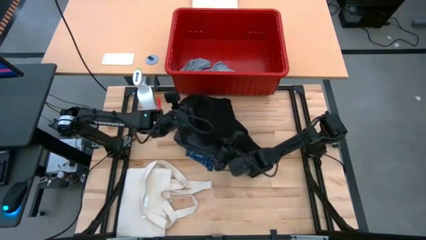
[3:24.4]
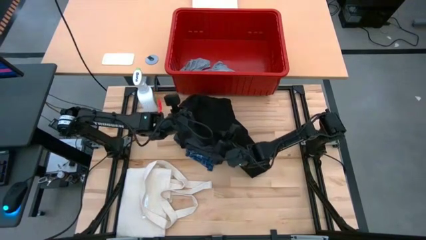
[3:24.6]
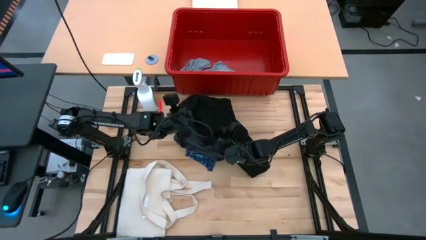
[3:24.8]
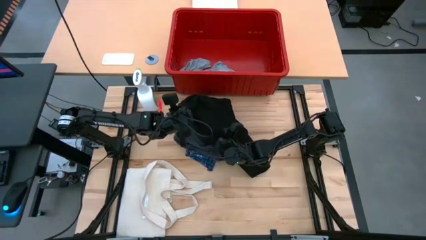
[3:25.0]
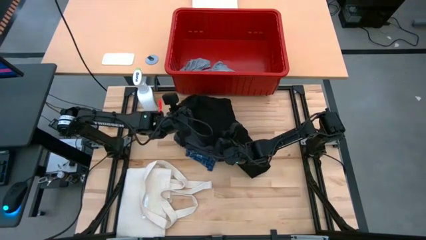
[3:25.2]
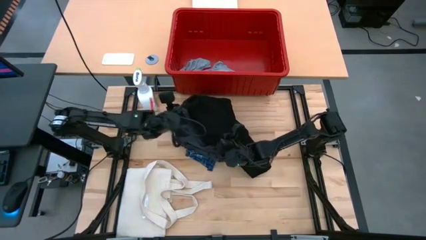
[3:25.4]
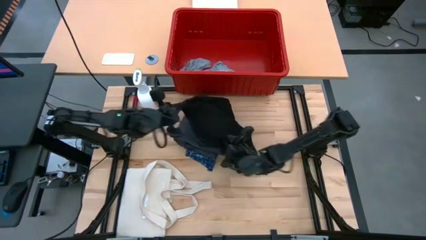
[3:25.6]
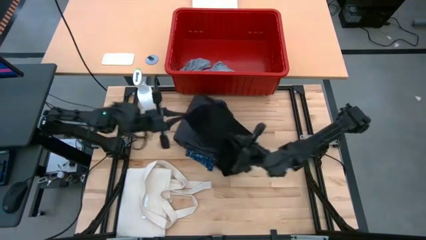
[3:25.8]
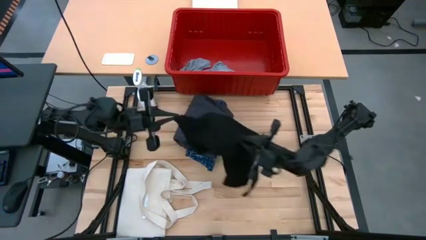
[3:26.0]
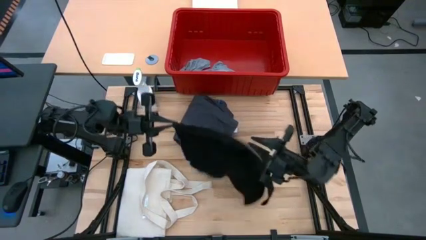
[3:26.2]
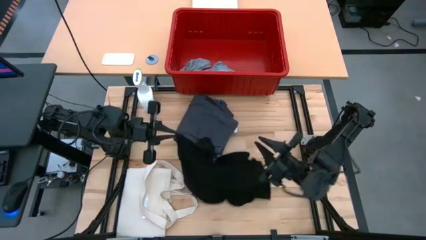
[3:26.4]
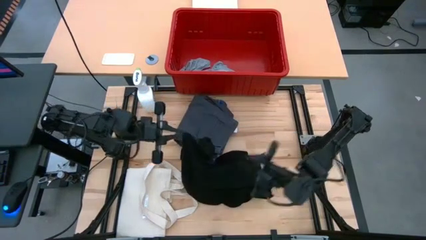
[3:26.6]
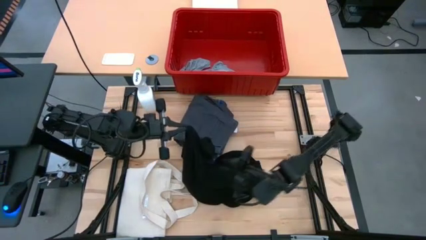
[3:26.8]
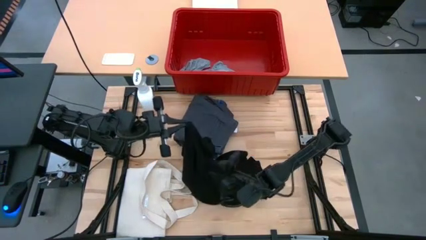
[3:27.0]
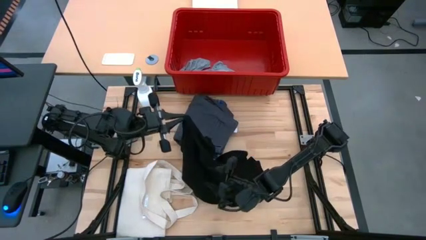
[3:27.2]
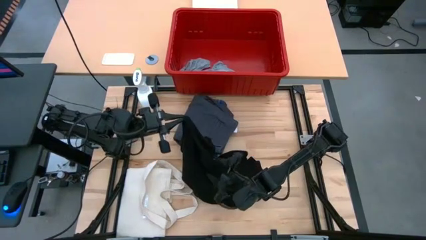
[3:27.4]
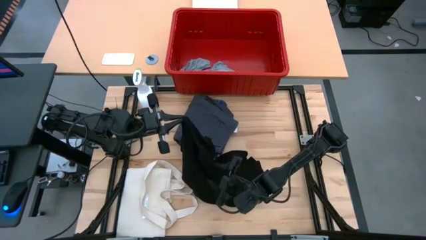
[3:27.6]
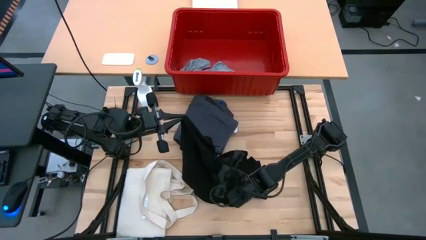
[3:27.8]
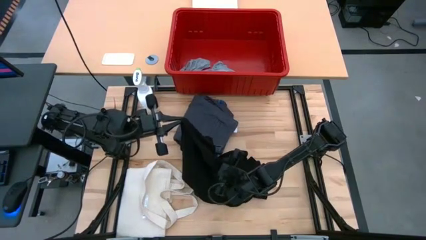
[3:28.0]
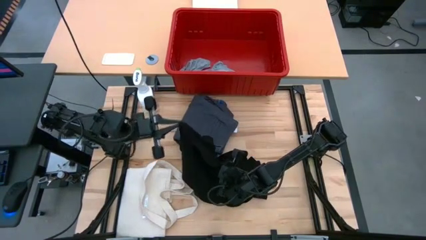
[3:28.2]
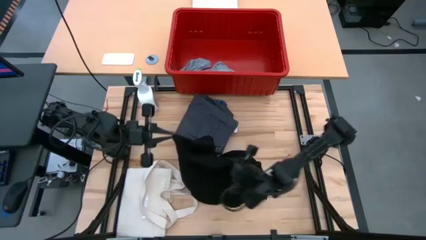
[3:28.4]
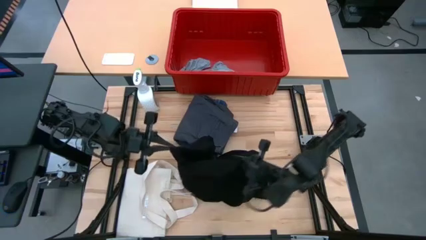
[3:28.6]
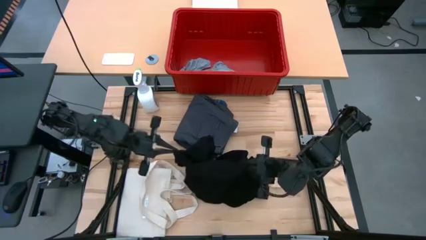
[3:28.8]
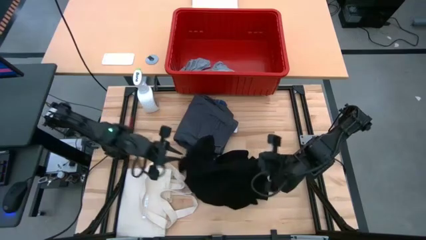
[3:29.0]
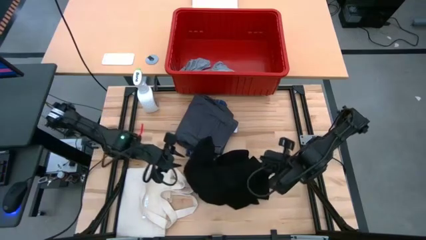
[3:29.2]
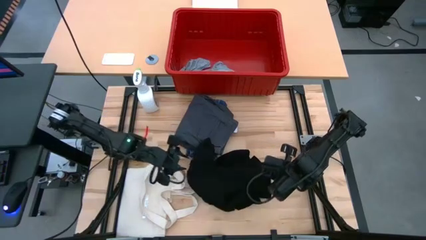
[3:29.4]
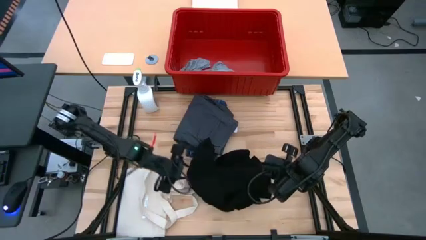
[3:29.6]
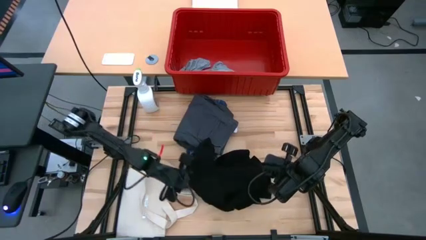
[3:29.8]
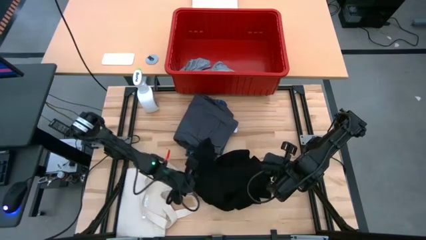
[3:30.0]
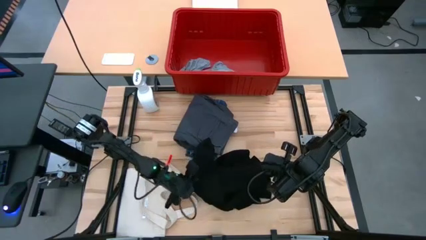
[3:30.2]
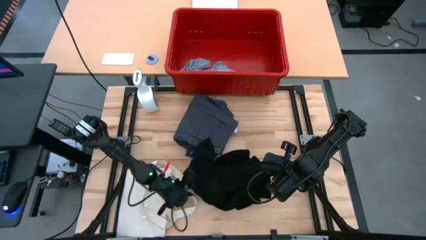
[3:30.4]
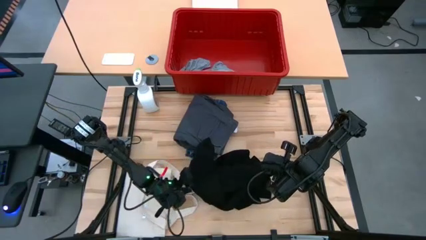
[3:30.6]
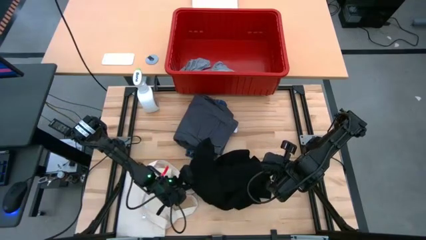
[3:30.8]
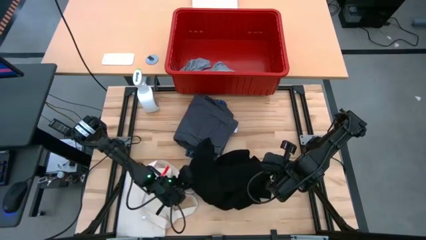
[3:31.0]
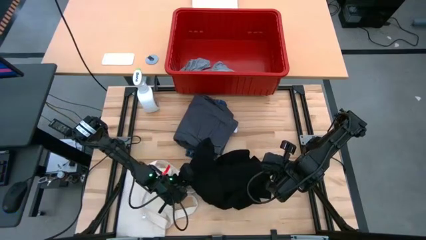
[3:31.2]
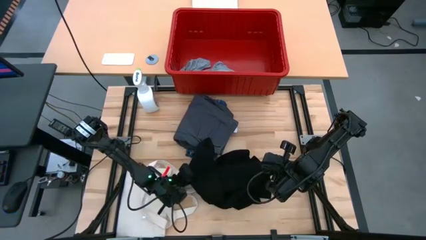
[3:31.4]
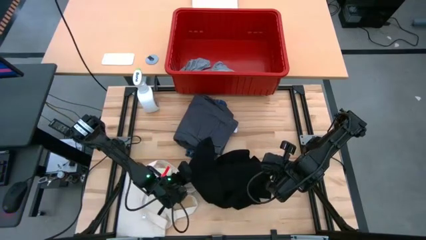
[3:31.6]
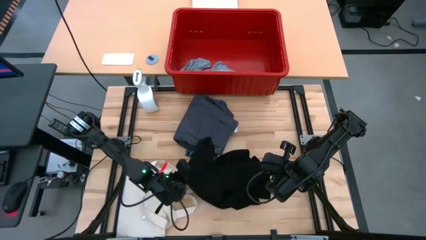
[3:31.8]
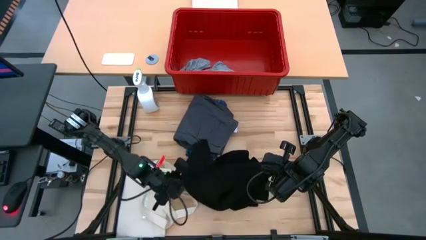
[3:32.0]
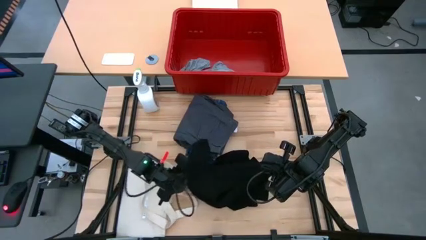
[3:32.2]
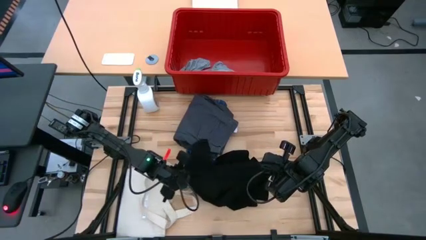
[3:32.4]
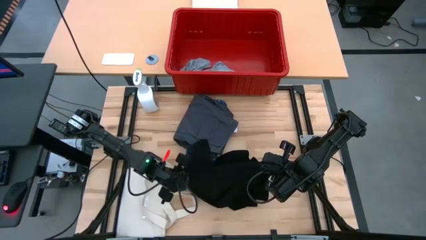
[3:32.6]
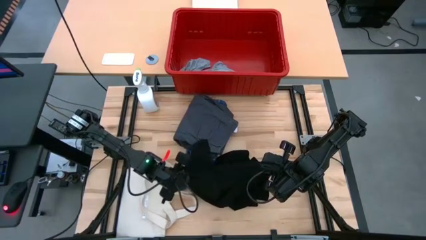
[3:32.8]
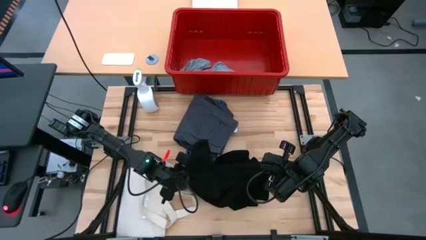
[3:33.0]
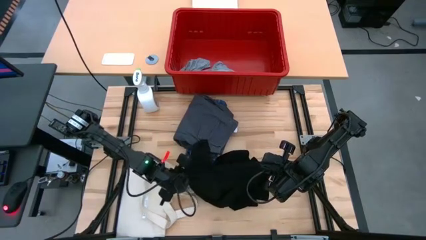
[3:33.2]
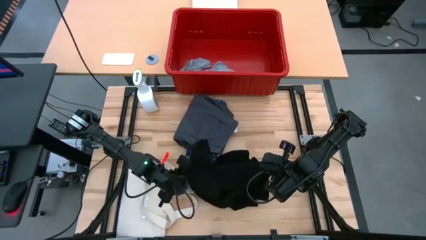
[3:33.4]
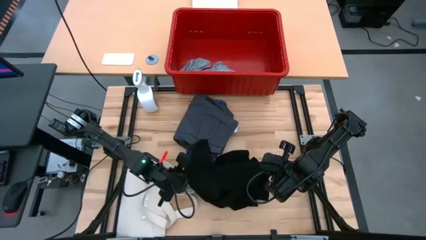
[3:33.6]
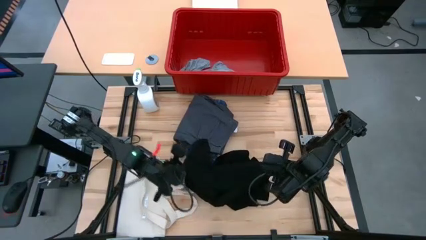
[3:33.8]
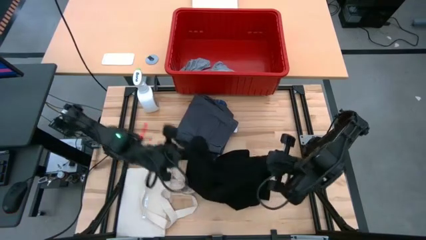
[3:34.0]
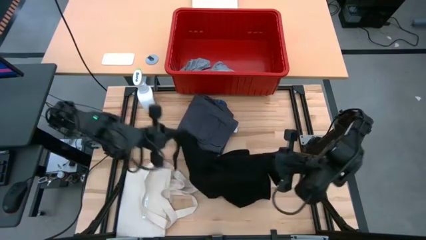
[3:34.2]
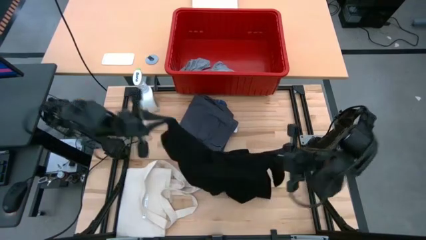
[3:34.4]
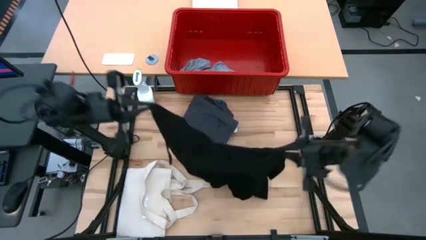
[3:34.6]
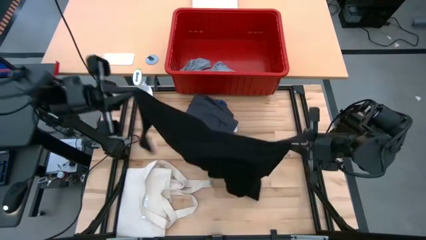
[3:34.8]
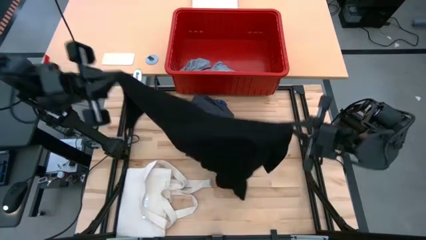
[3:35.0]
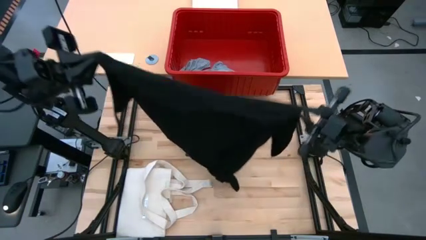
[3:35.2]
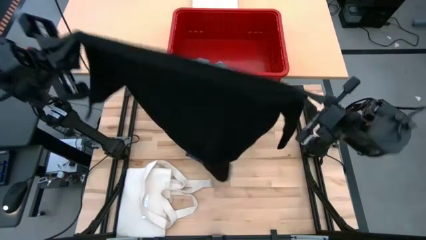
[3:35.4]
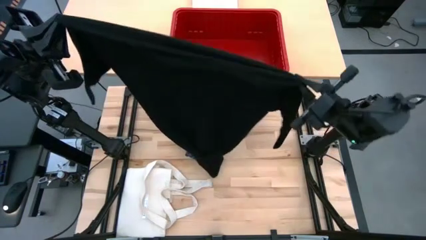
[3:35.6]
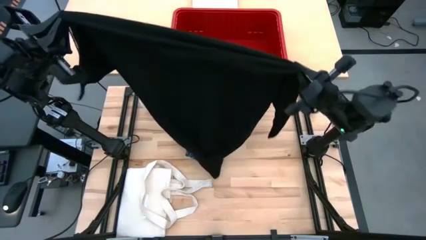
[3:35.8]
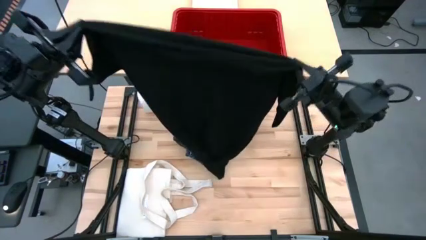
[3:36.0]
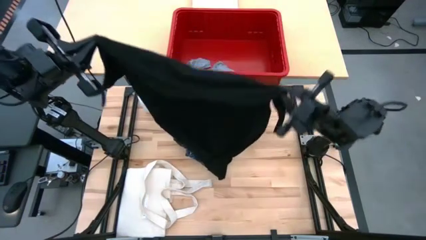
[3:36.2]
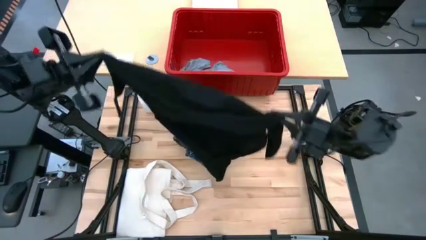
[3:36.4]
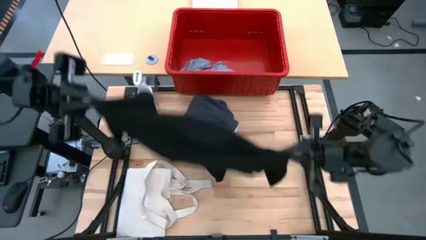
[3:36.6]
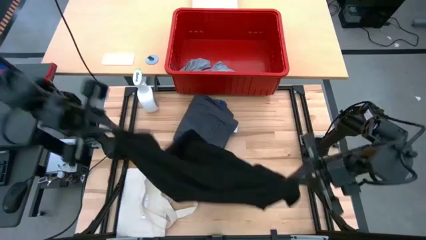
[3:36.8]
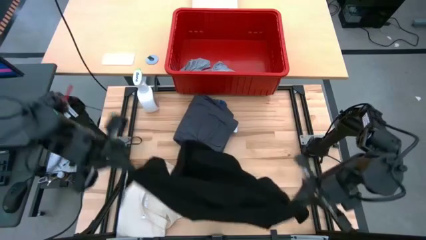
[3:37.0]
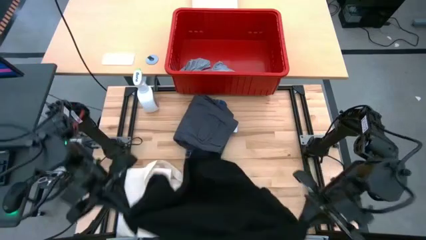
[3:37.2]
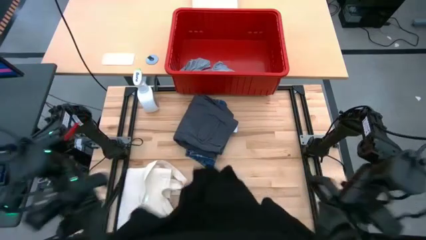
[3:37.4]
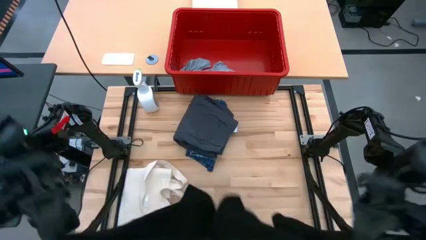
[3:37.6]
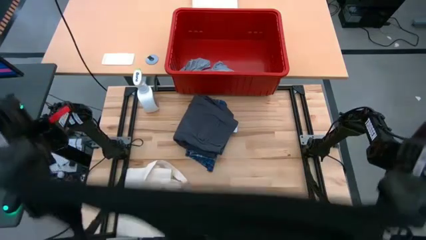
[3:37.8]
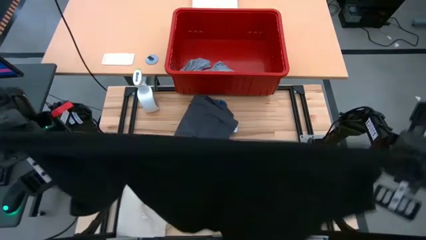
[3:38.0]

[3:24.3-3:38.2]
Task: Fold Laundry from Bin
Fold the black shirt
